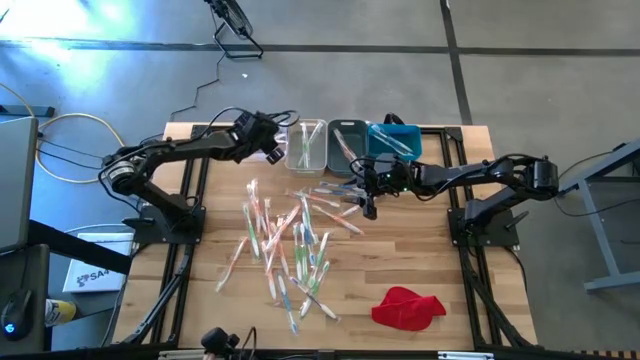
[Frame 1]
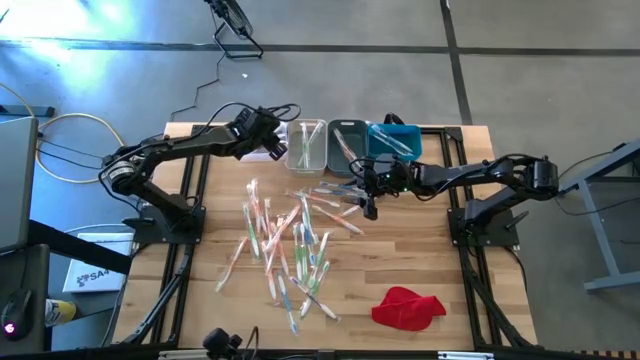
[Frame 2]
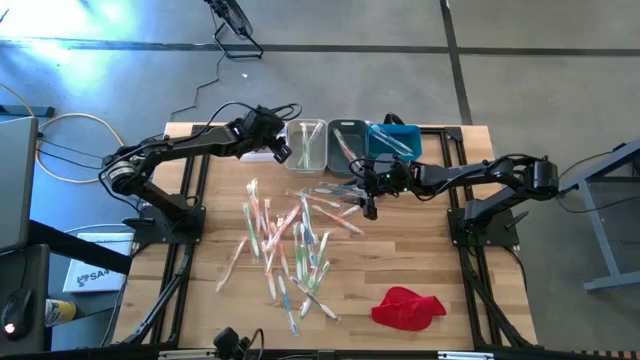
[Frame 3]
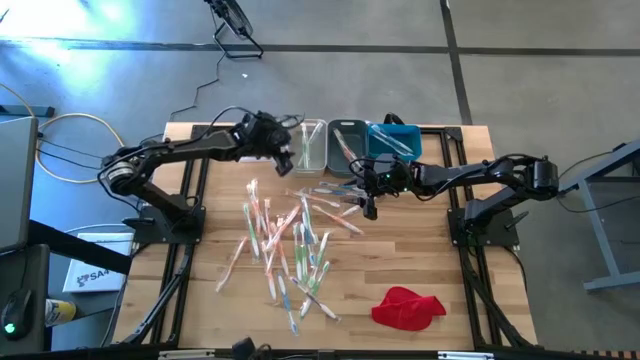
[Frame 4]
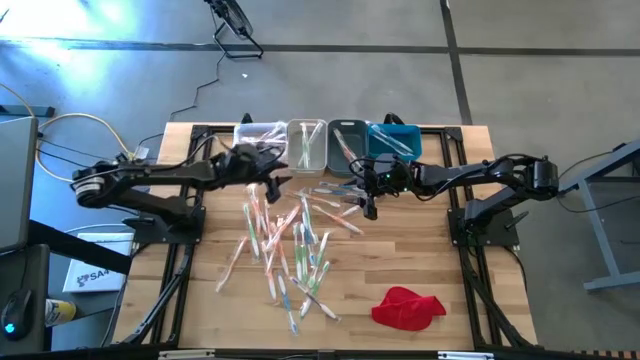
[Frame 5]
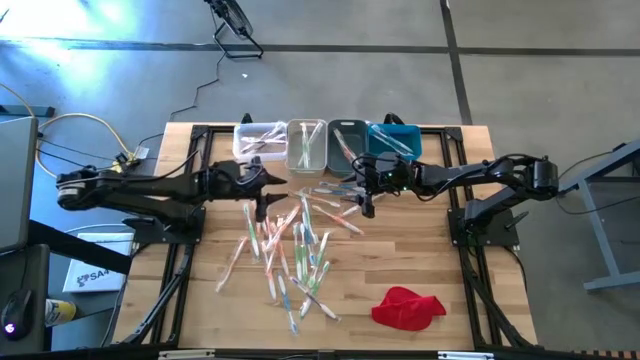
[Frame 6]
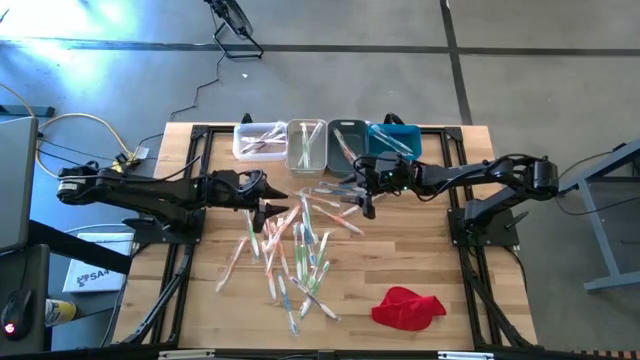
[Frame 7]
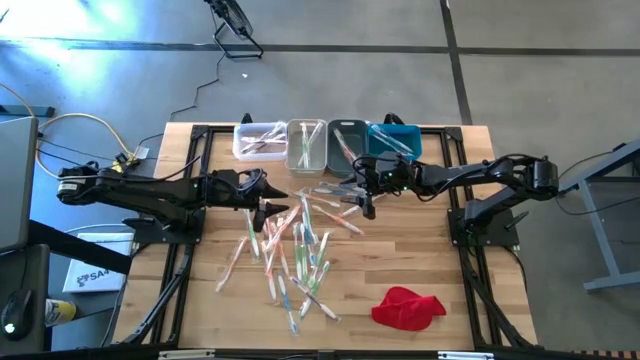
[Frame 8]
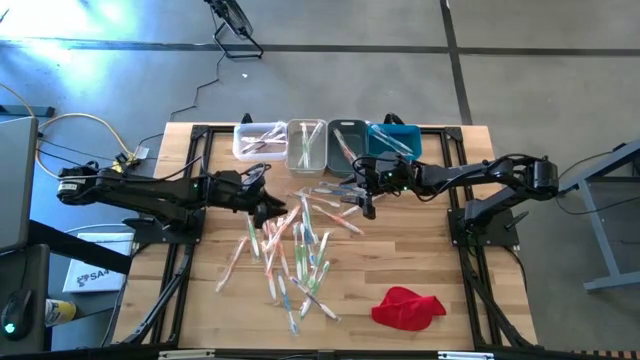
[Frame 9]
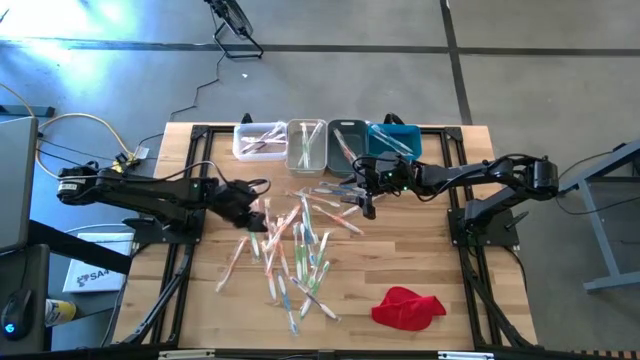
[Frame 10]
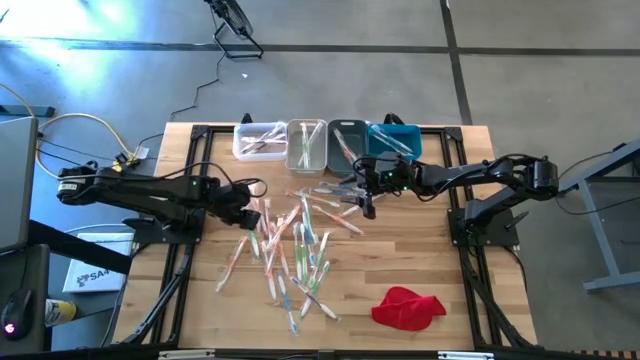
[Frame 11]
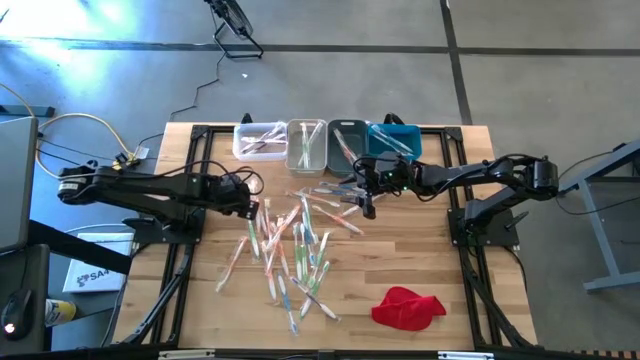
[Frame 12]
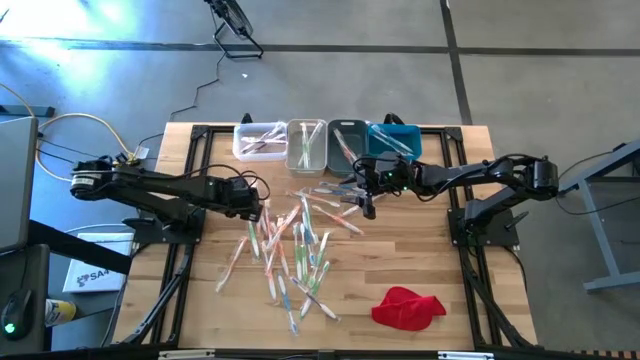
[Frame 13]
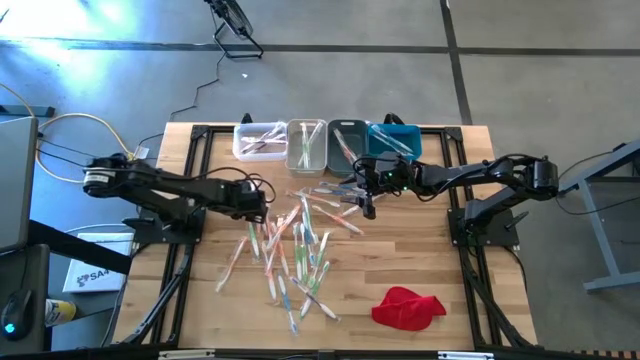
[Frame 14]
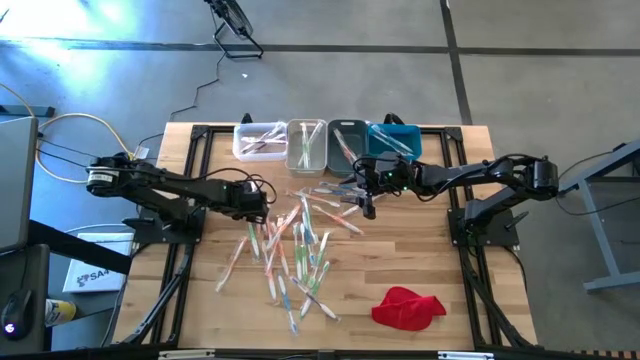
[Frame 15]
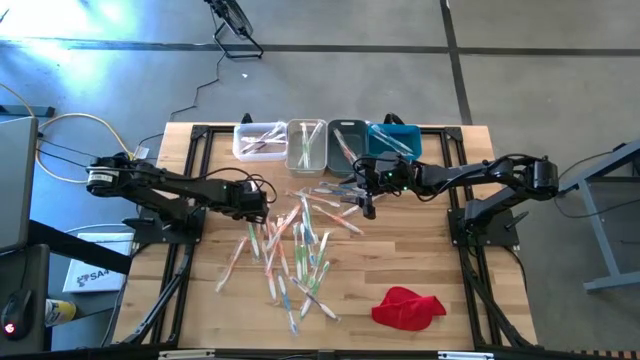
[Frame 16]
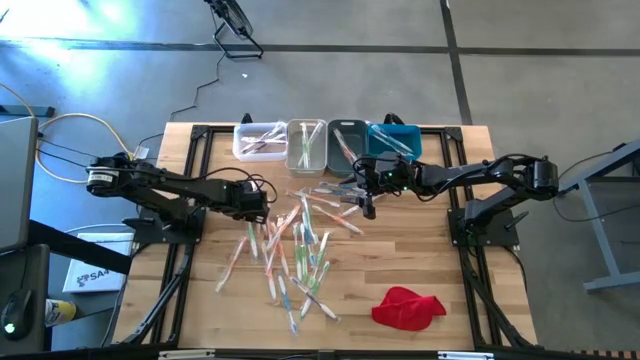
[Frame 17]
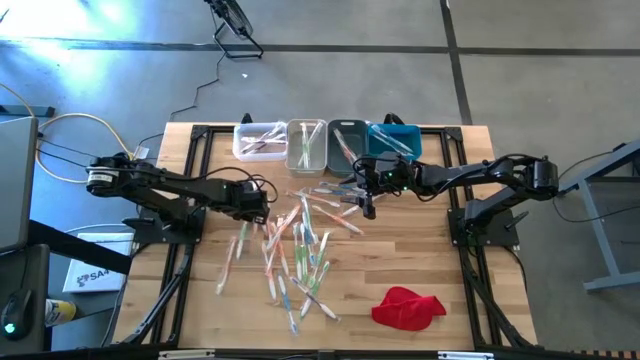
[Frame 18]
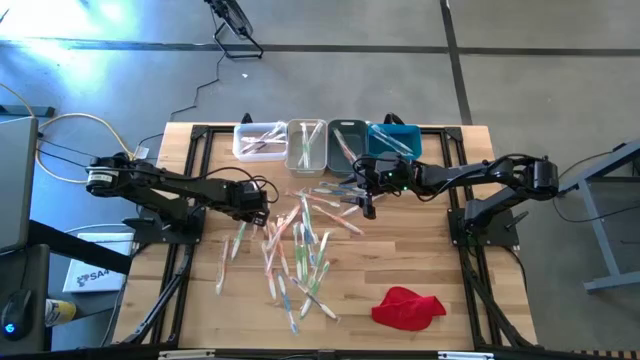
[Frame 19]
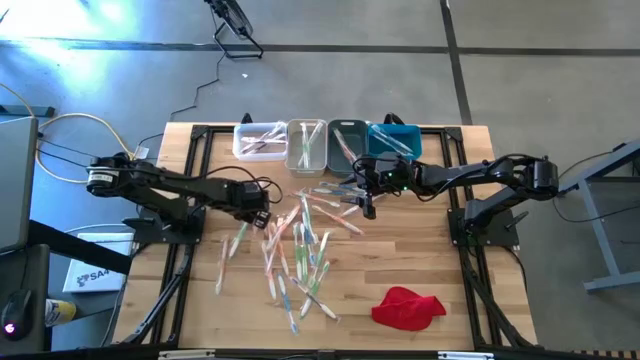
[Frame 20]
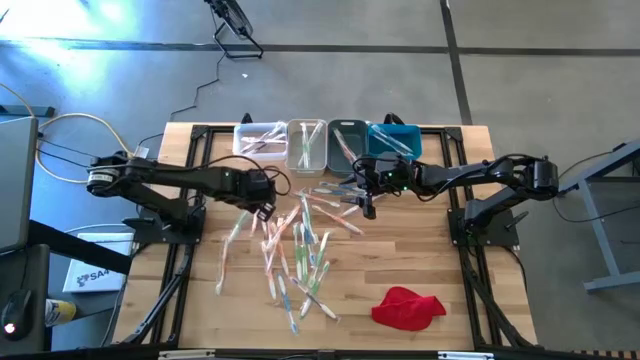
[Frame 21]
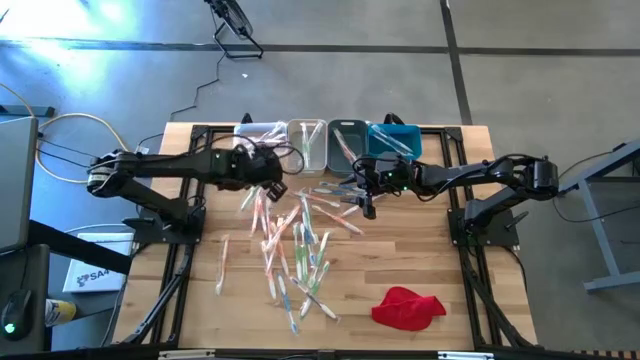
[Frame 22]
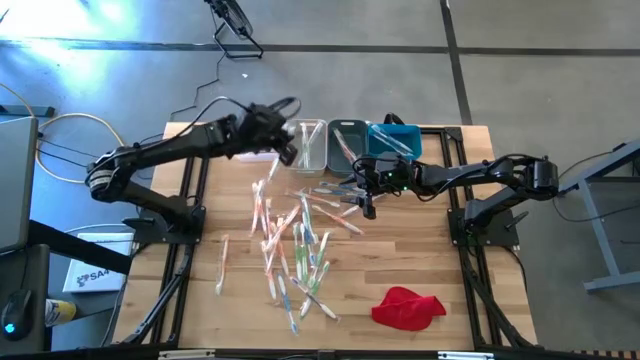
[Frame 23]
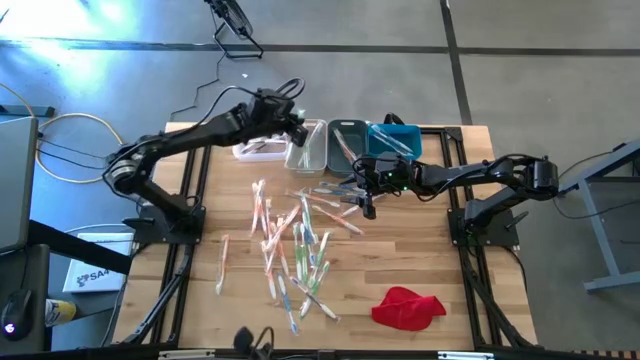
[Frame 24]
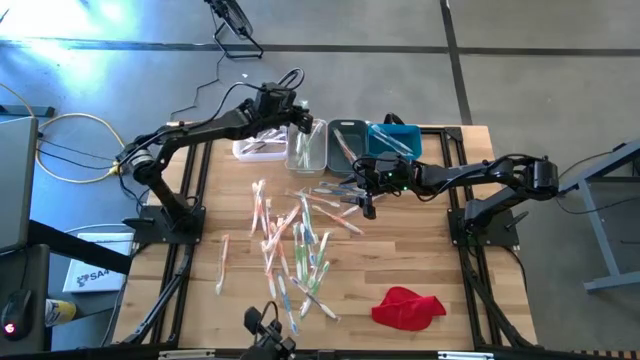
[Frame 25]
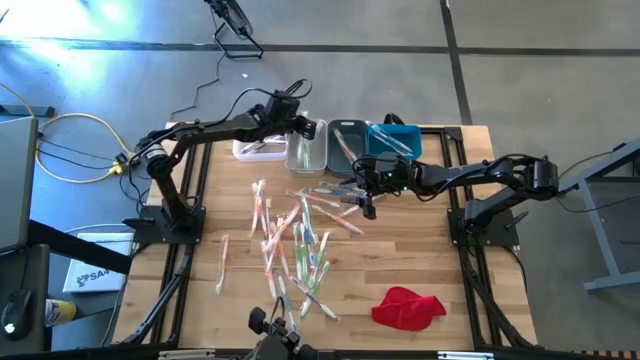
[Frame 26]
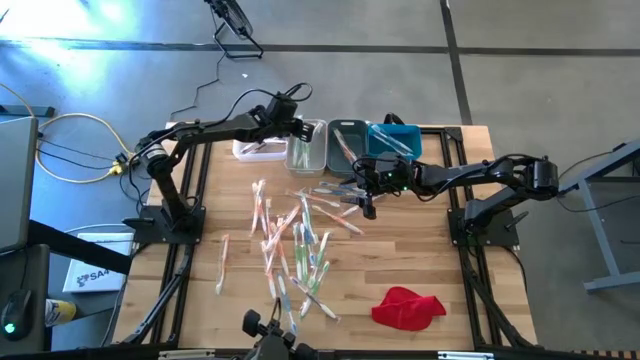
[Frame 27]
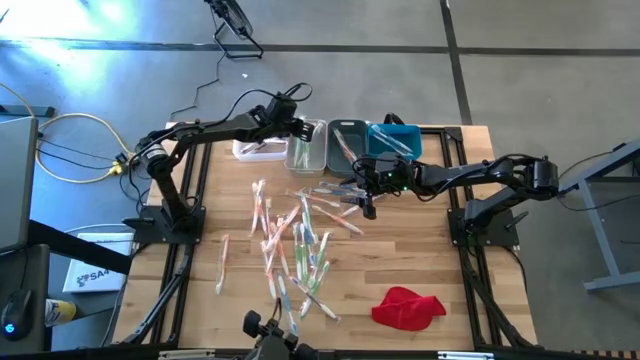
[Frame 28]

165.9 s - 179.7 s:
Task: Pick & Place Toothbrushes
Put the green toothbrush into the gray bin

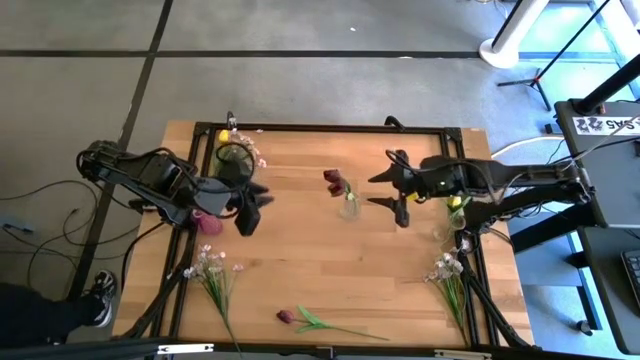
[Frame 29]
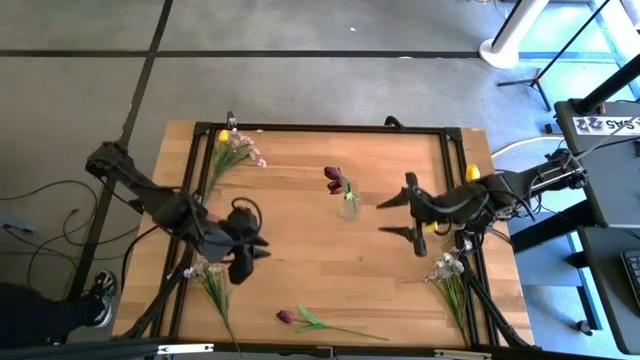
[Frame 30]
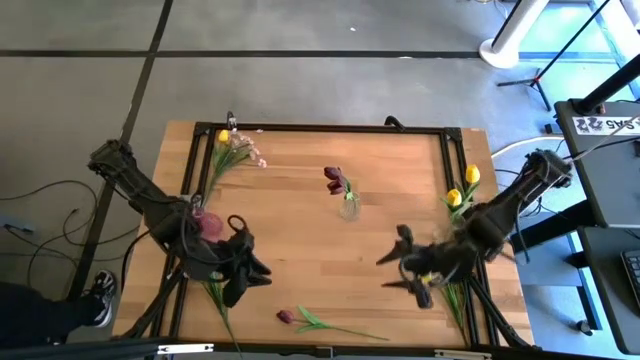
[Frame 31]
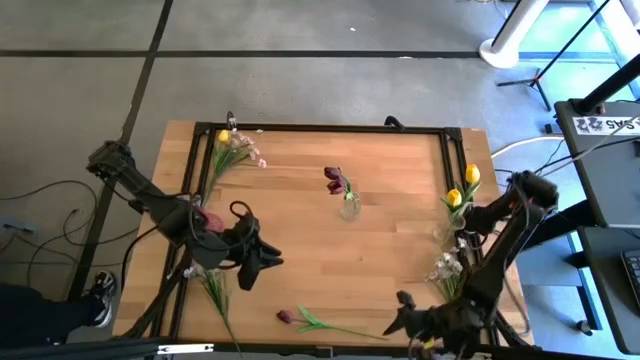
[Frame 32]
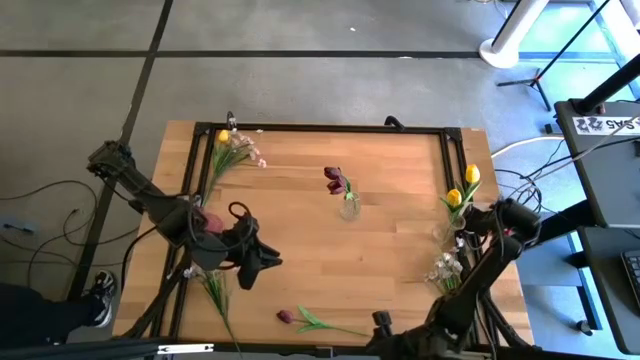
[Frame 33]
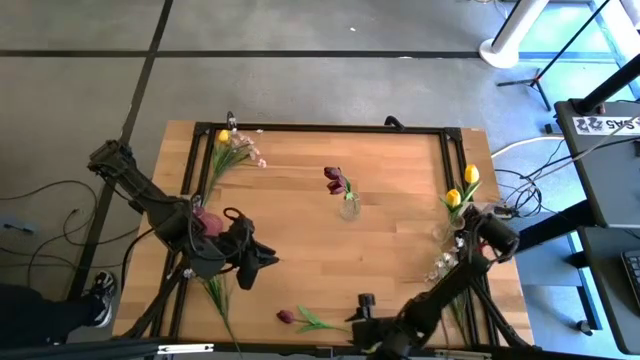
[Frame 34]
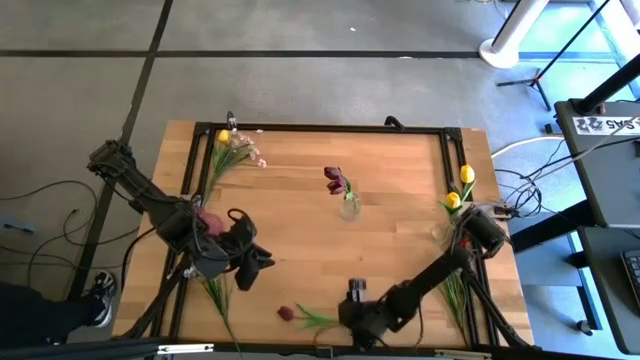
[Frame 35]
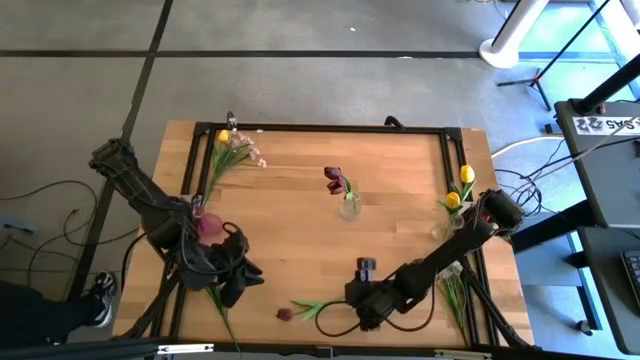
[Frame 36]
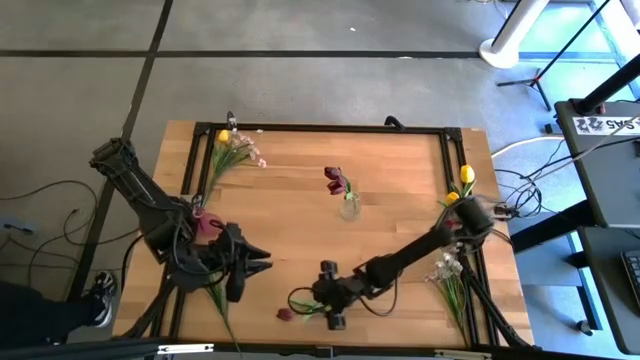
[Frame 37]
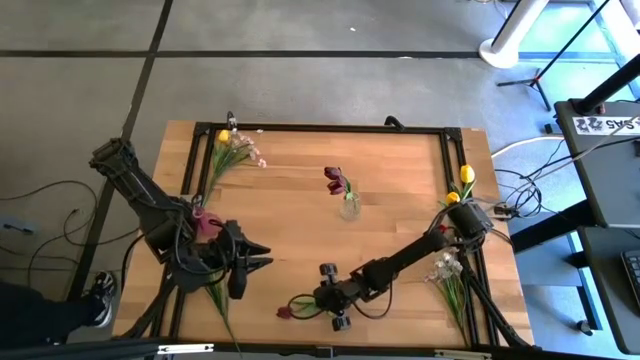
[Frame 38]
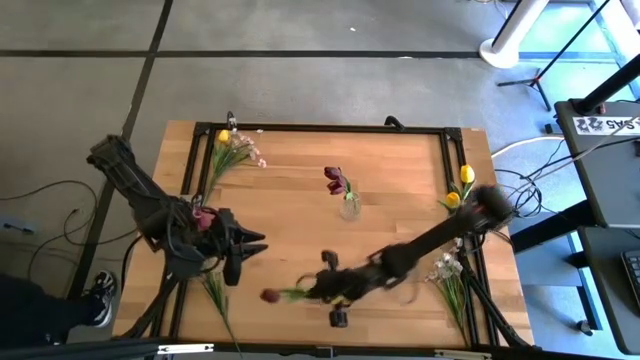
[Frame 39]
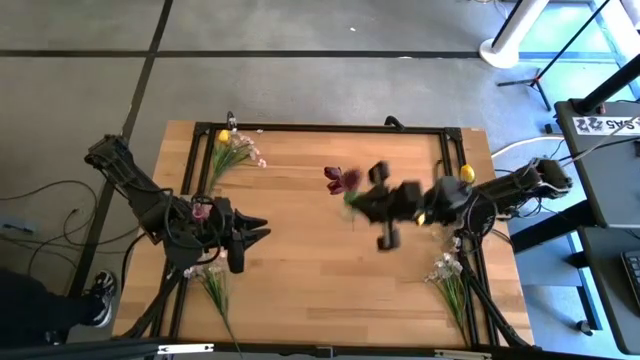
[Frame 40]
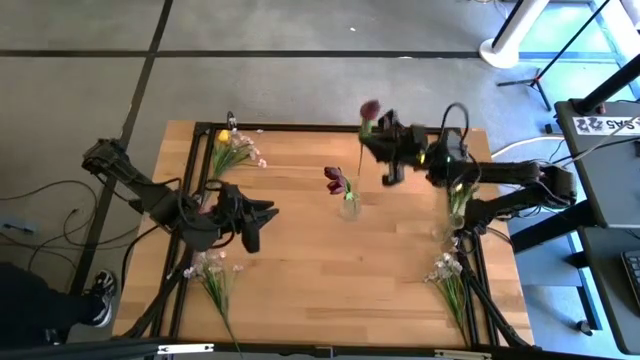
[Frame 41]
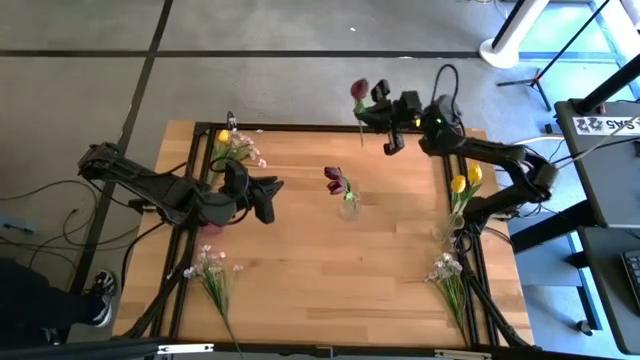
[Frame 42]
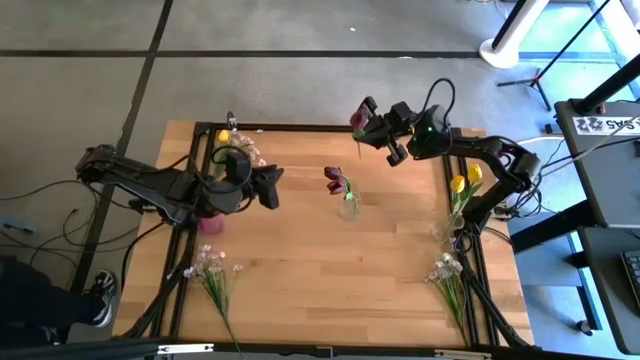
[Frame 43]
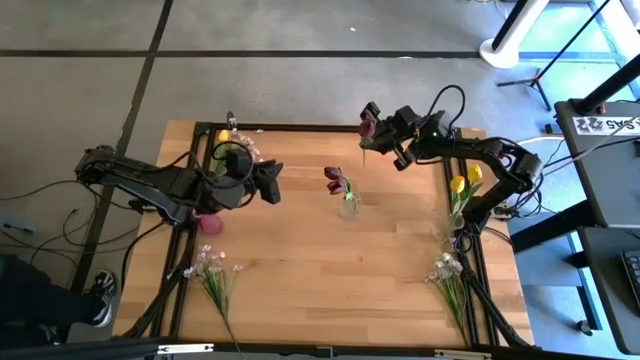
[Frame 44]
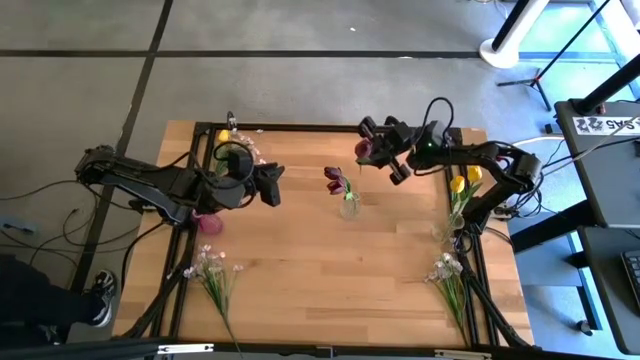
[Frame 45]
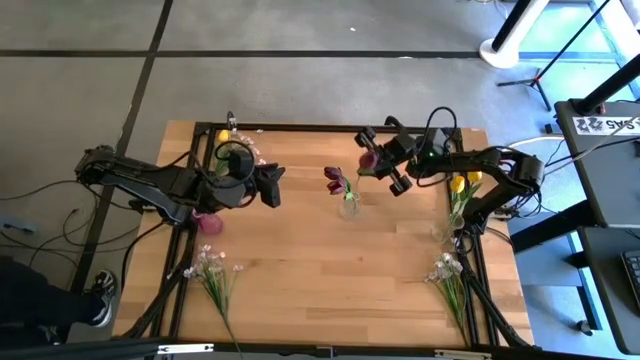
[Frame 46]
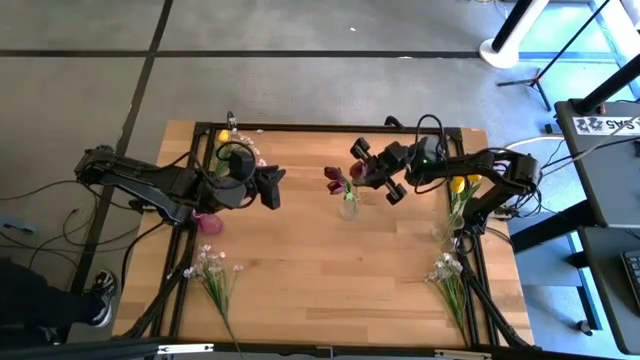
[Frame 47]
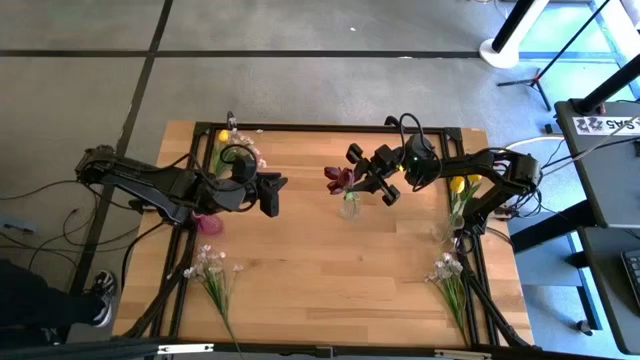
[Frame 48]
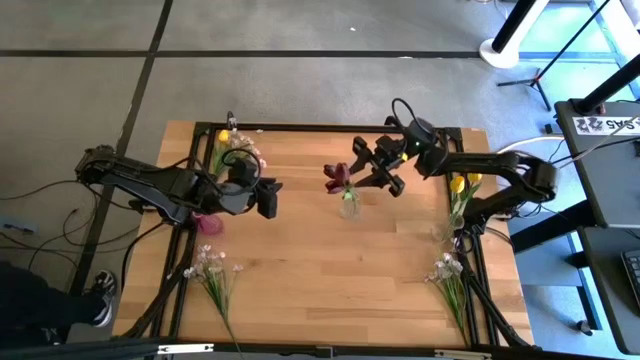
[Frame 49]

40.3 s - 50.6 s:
Task: Sort flowers into vase by color
Put the red tulip into the top transparent vase
